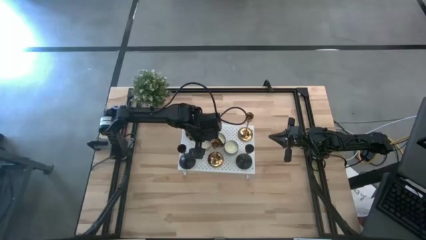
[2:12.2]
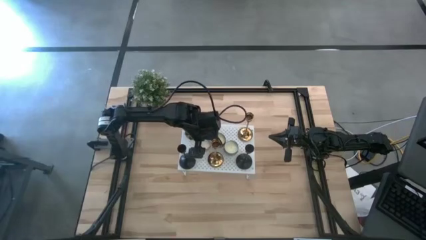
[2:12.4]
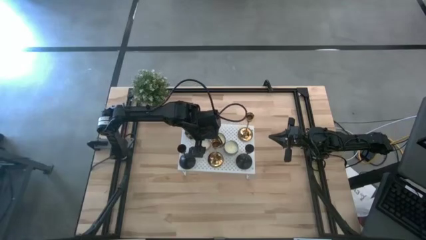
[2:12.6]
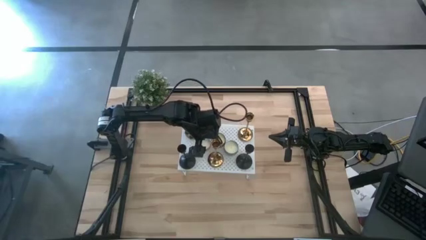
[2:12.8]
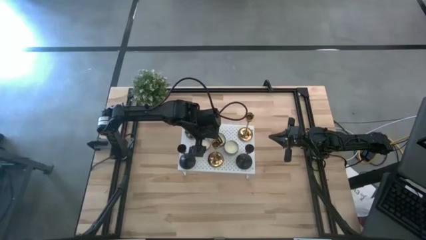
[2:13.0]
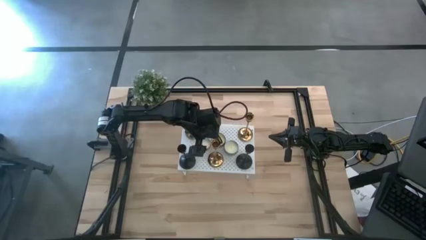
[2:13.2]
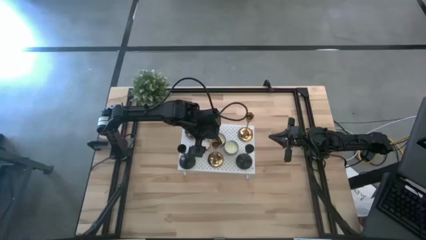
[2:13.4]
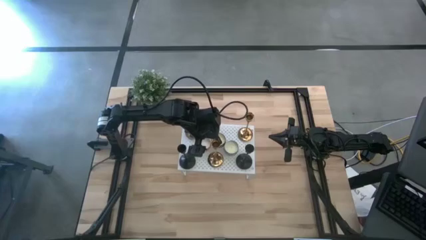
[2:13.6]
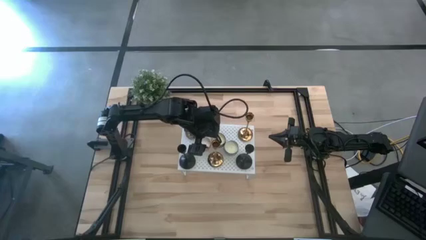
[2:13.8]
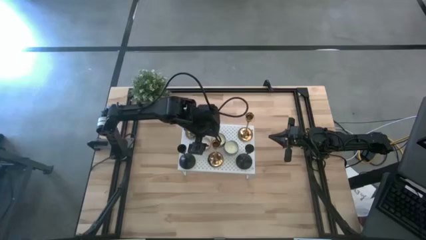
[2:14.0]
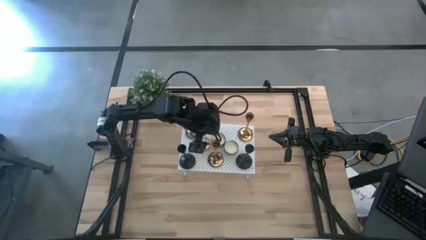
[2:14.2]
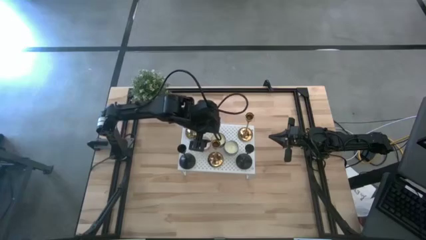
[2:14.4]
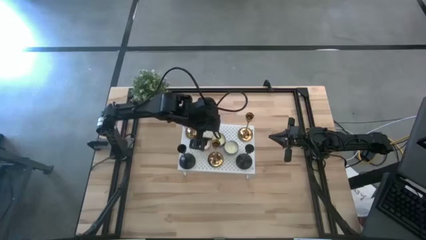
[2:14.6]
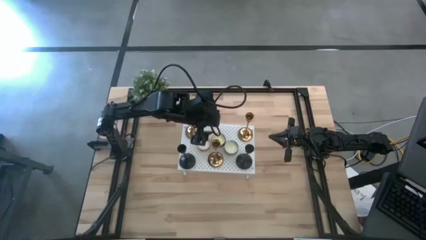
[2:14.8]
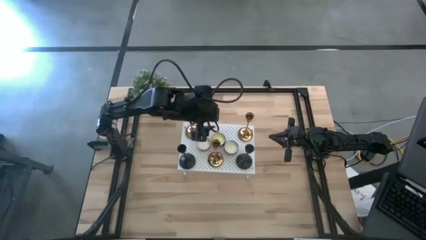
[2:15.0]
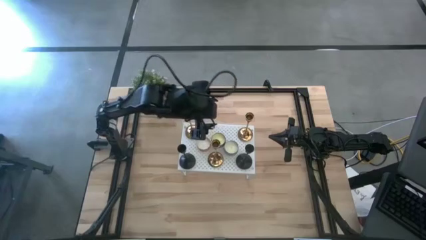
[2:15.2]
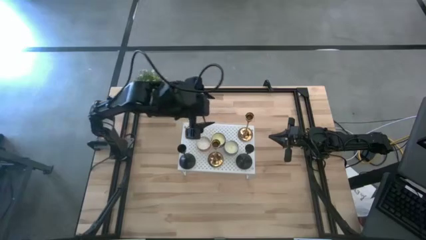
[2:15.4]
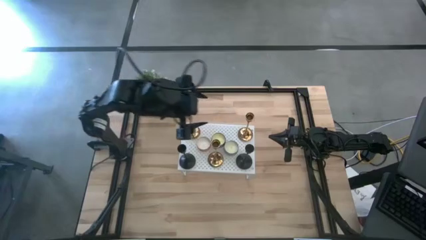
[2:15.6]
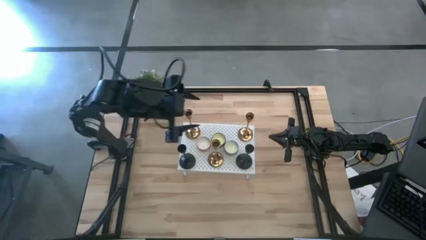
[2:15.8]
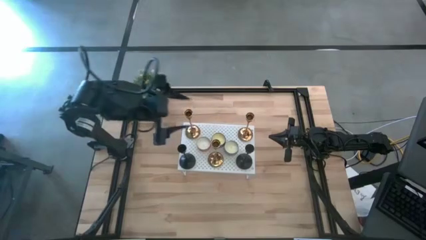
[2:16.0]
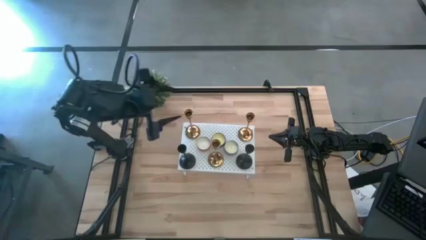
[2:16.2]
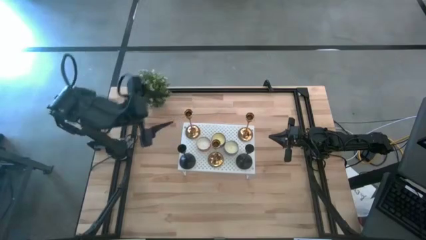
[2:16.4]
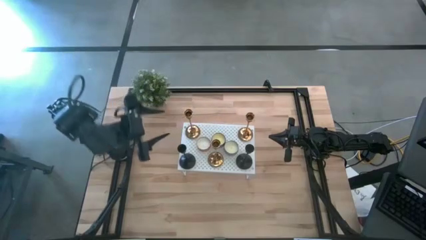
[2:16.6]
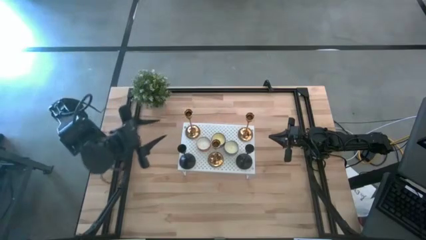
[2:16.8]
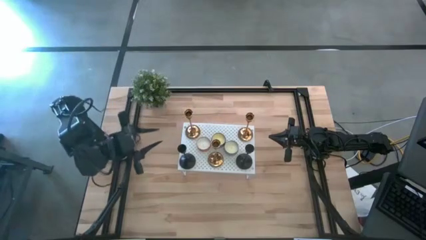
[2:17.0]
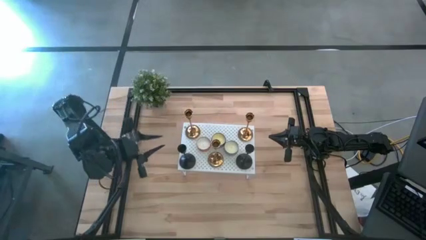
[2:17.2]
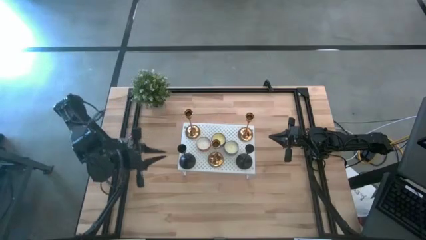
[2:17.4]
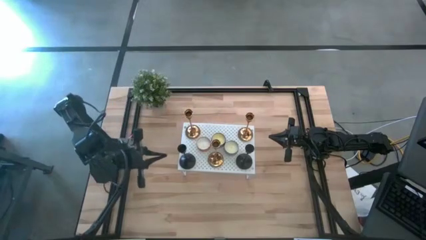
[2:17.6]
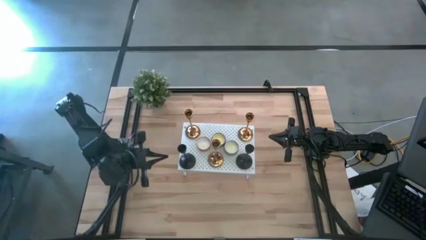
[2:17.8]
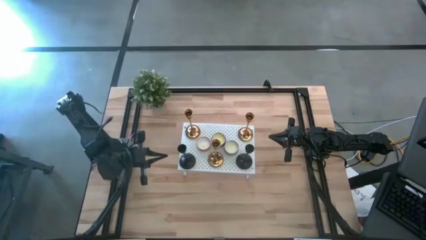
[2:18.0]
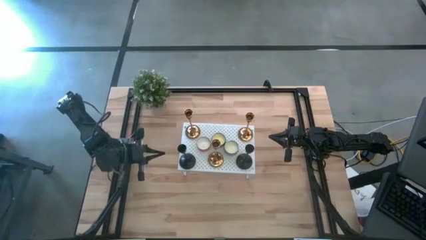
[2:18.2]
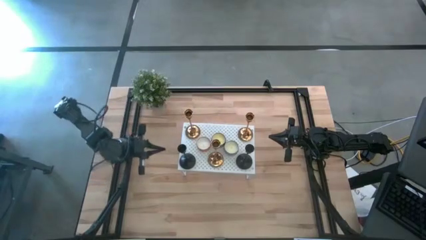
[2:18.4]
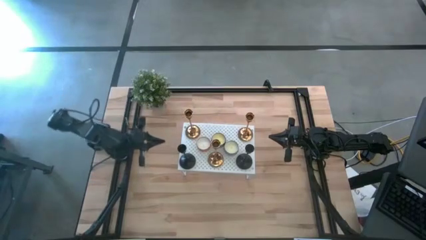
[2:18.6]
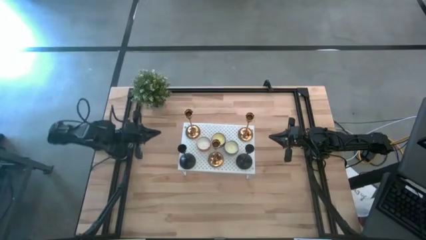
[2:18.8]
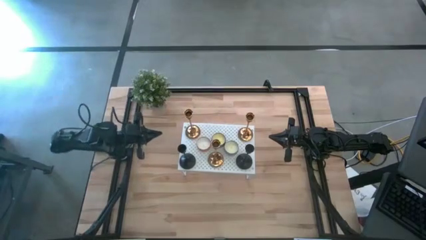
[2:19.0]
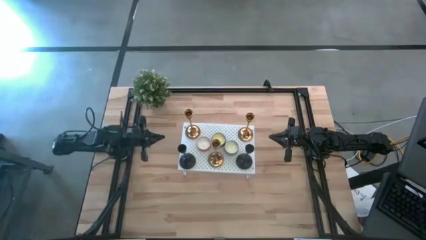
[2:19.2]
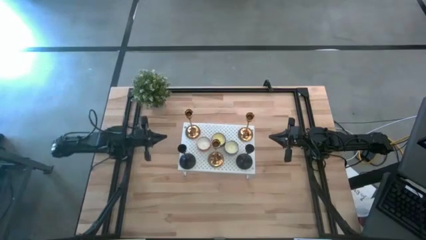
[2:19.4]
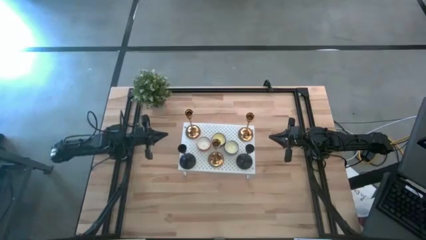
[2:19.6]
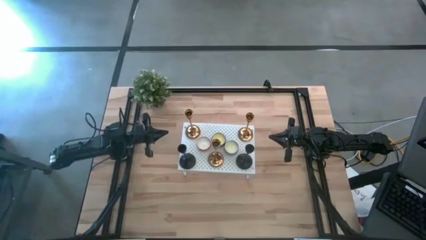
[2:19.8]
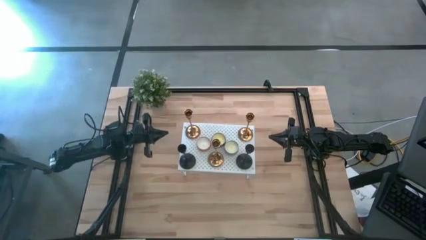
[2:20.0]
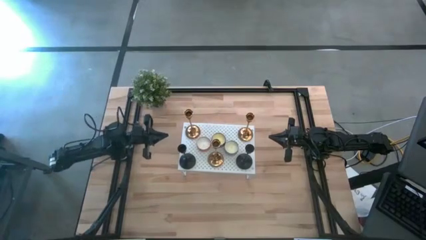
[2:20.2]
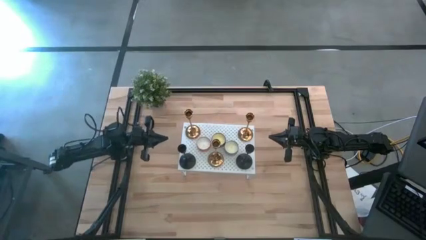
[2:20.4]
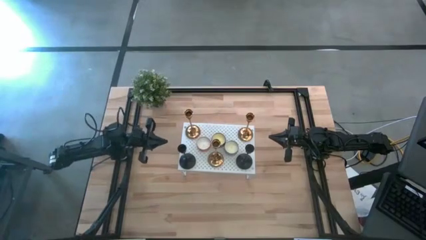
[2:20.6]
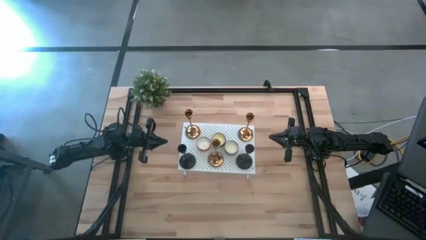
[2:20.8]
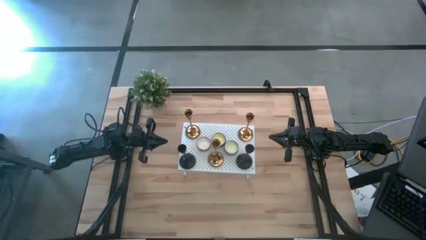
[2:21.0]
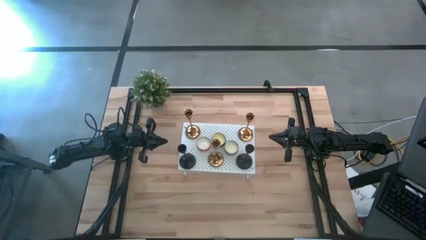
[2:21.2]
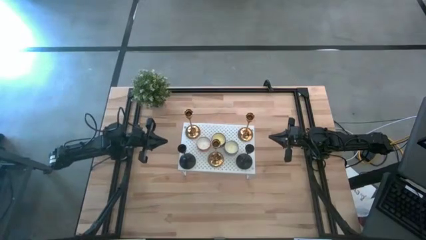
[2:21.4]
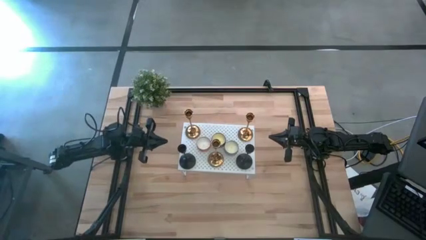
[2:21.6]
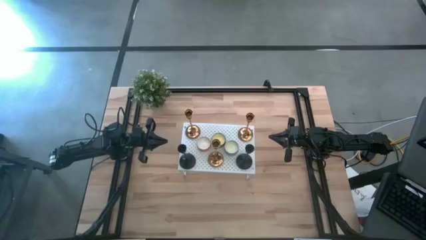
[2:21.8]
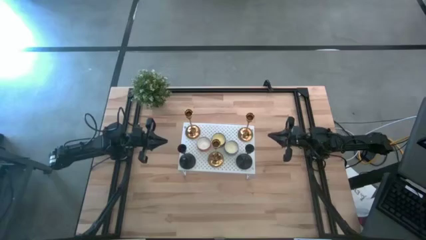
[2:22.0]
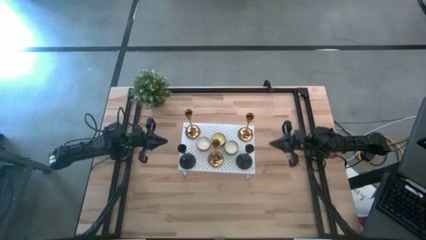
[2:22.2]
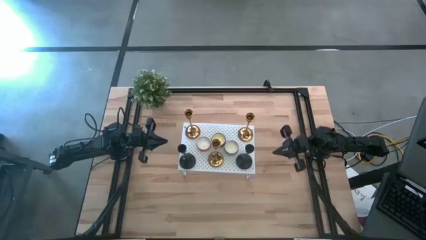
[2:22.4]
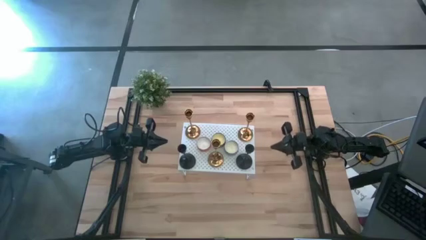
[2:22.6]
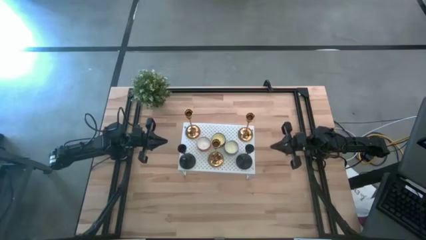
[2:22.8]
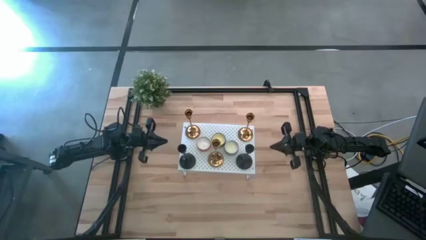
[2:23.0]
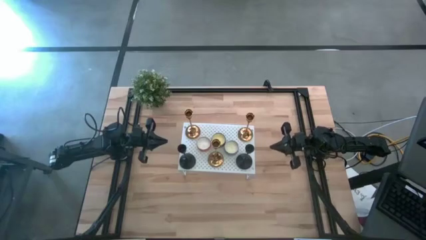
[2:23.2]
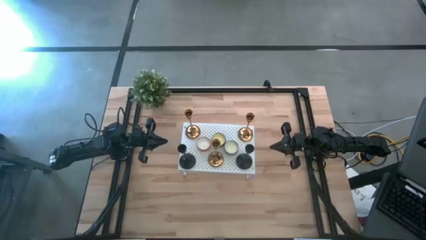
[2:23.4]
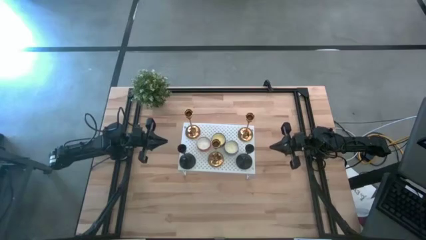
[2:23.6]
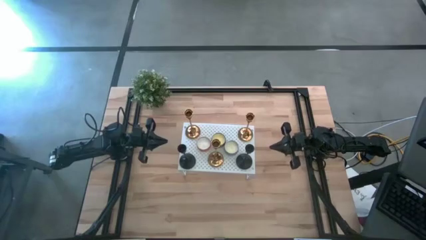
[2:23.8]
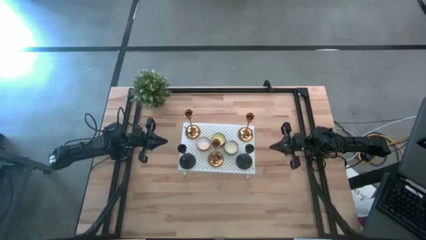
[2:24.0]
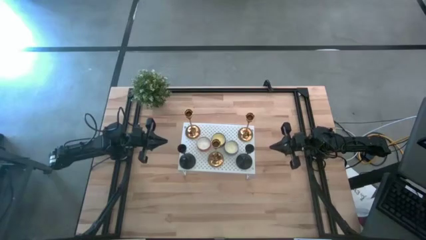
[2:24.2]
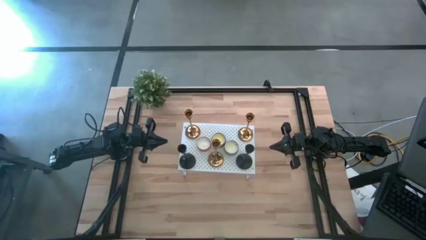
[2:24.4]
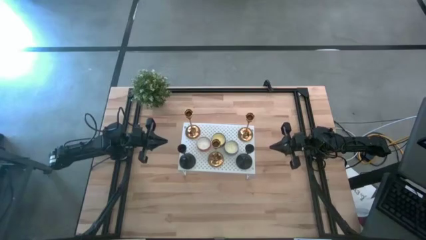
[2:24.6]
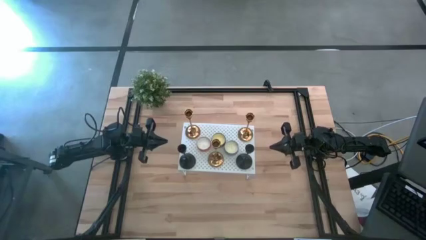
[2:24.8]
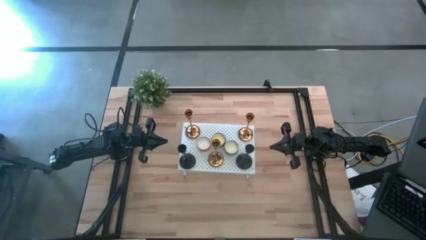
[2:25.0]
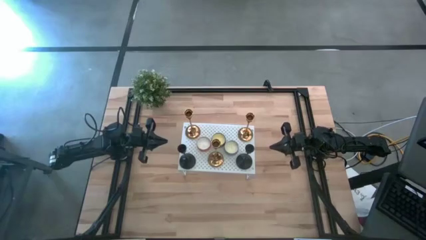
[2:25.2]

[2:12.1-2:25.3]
Task: Pick & Place candle stick holders
Return to Home Position

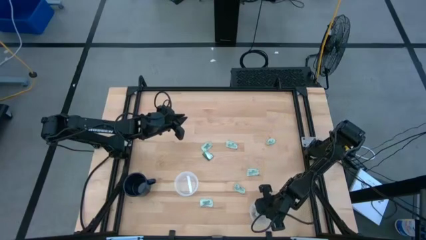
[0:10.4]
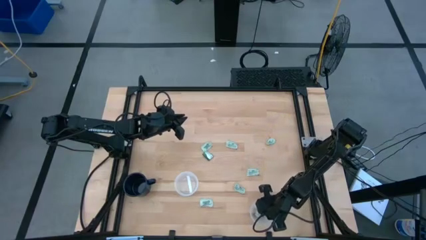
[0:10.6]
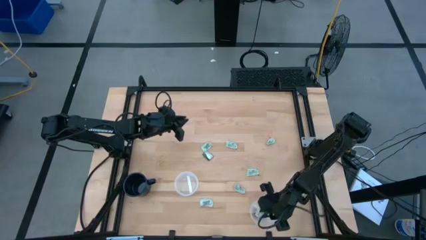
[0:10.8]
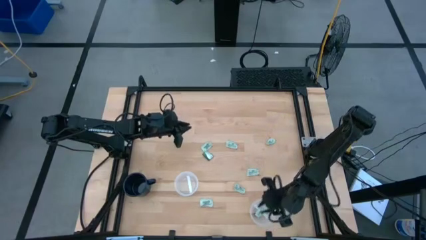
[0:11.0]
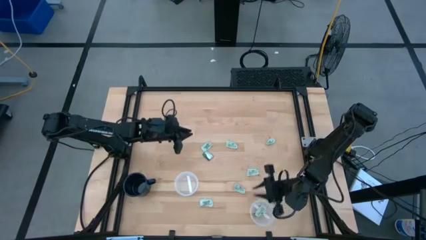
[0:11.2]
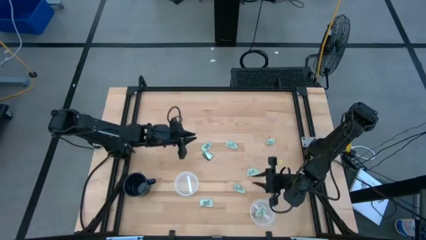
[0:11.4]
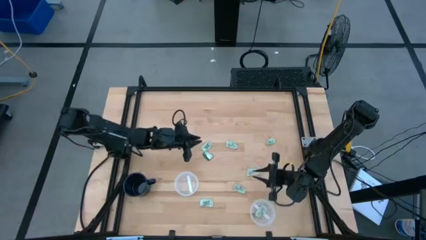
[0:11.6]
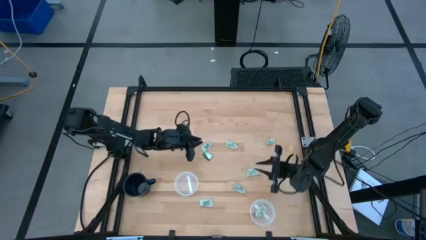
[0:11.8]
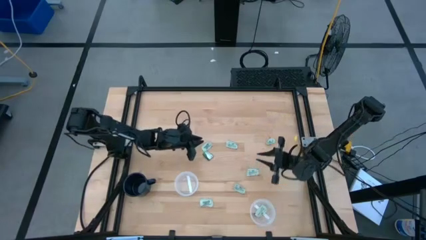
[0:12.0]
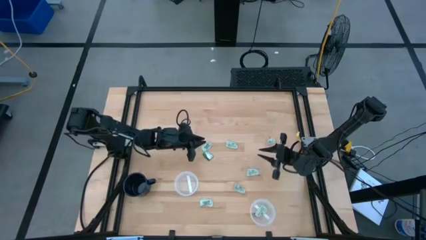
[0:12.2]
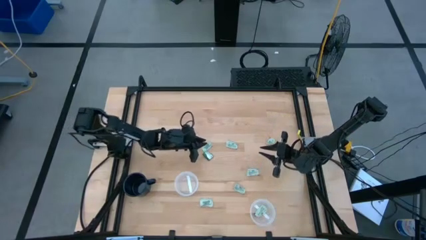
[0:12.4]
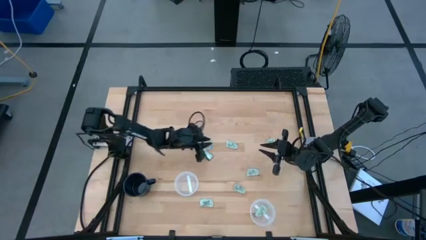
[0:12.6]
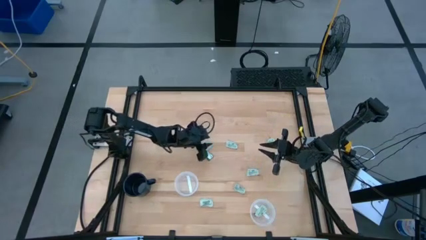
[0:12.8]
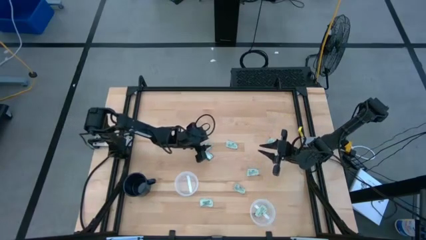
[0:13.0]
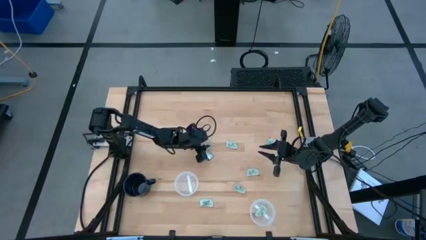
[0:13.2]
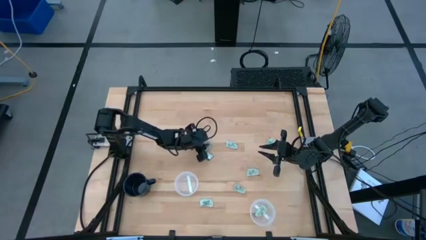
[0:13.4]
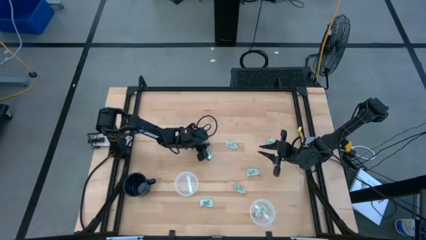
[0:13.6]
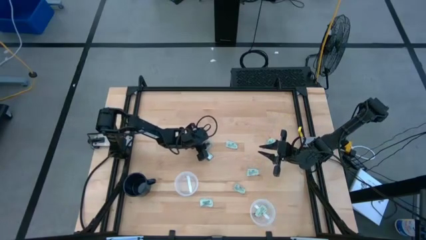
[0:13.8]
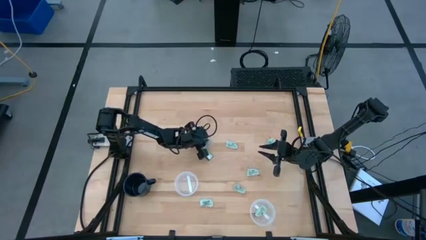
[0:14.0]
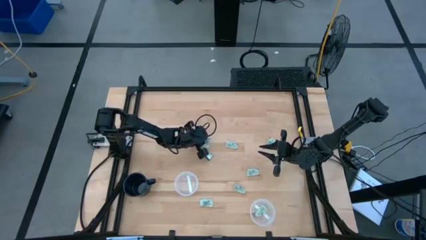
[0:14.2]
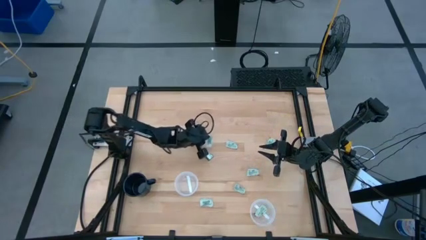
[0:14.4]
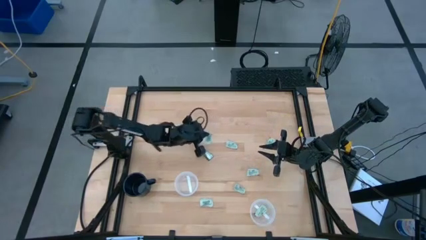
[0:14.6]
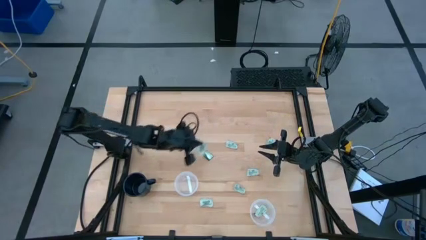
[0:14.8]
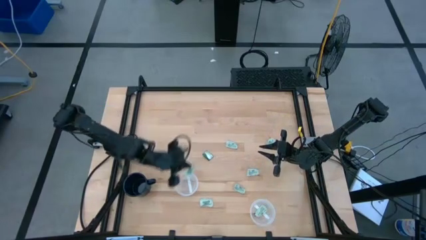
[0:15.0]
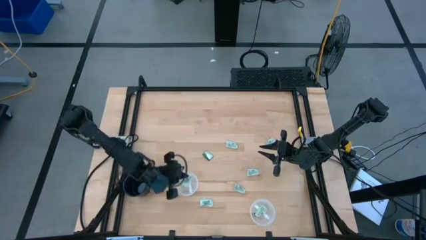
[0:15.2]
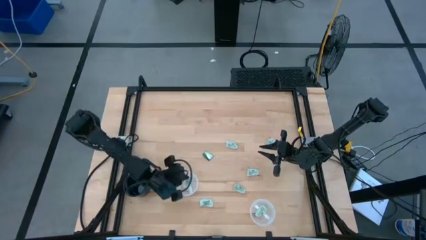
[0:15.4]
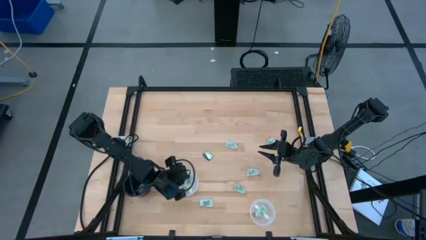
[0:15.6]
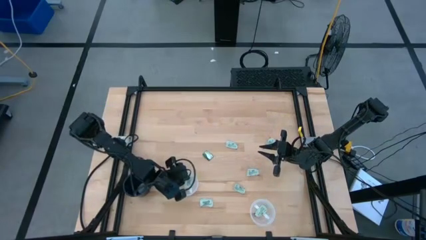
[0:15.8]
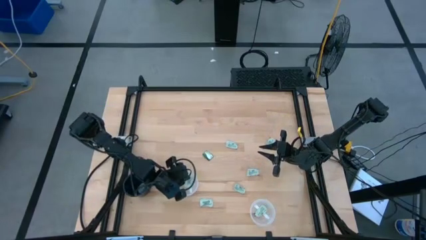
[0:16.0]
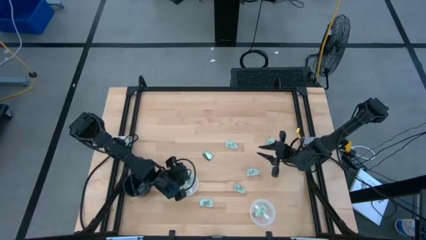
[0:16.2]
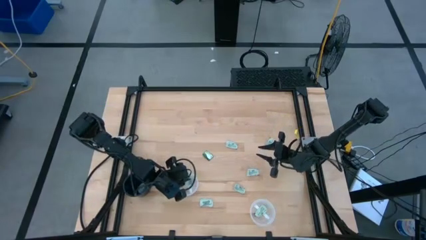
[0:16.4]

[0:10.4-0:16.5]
Task: Pick and place items into bin
Put the stevia packet into the top transparent bin
